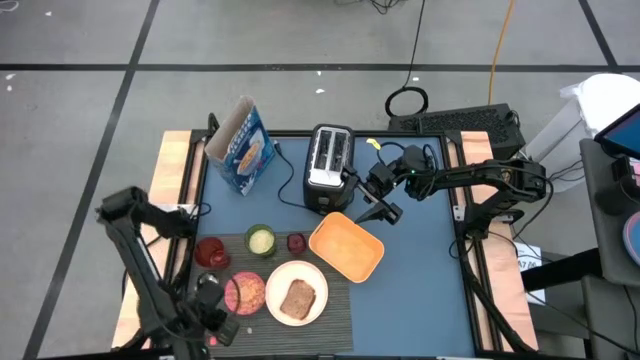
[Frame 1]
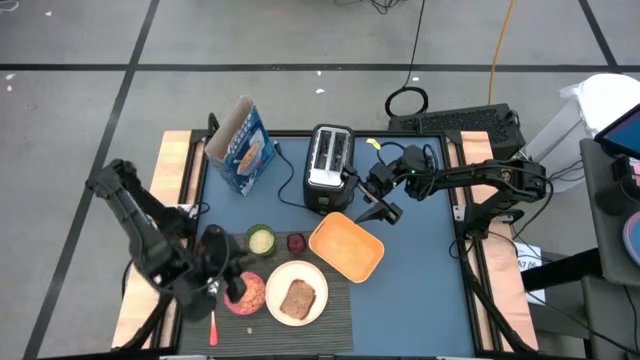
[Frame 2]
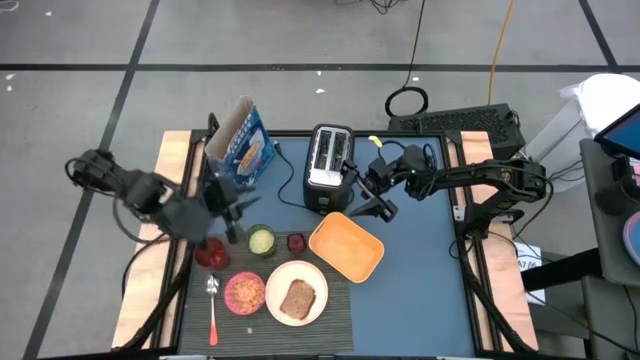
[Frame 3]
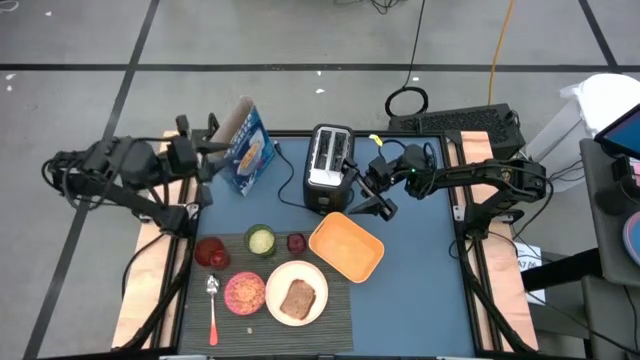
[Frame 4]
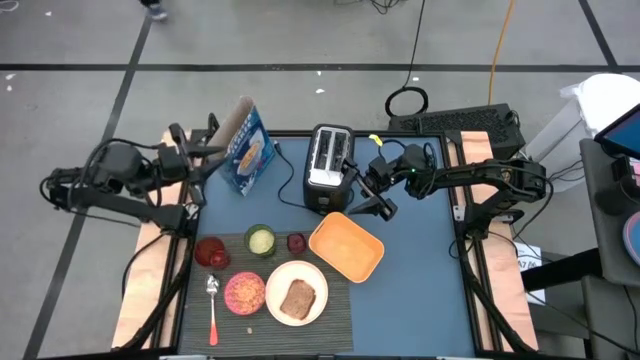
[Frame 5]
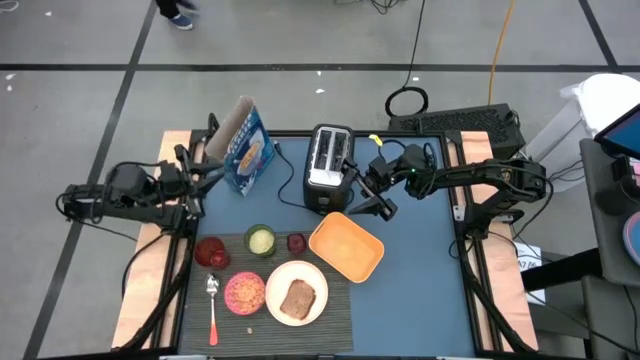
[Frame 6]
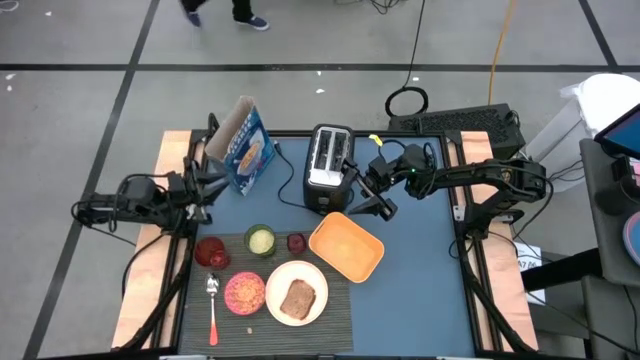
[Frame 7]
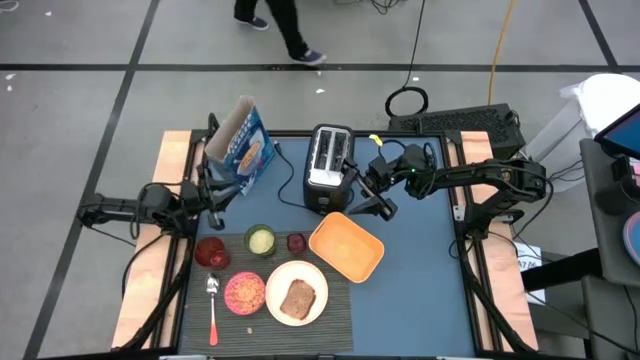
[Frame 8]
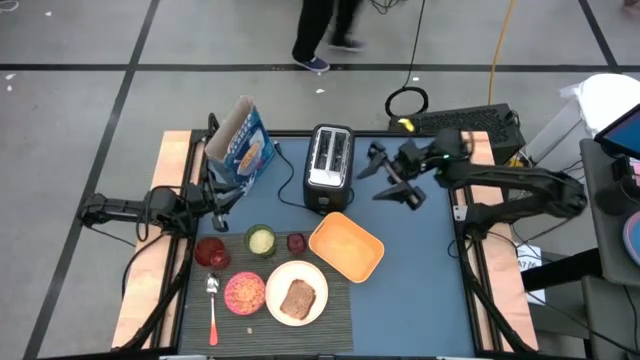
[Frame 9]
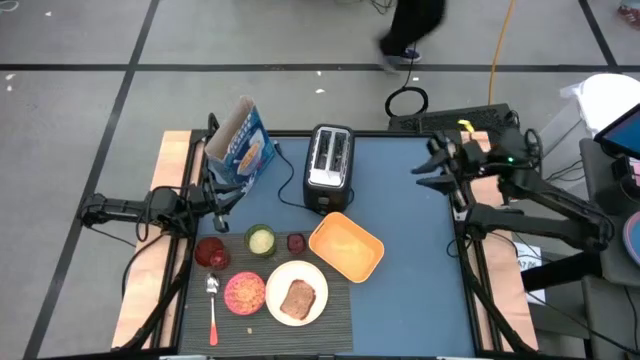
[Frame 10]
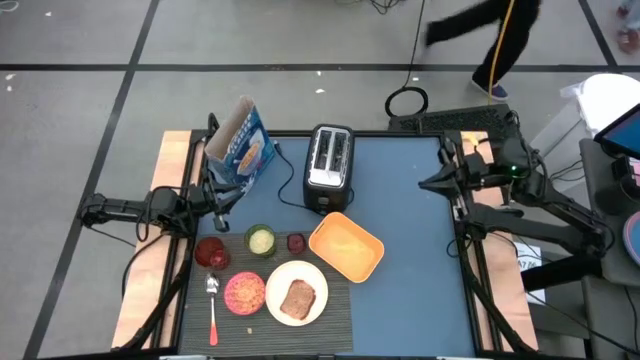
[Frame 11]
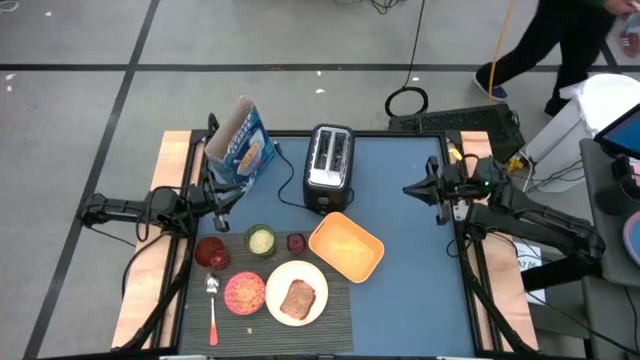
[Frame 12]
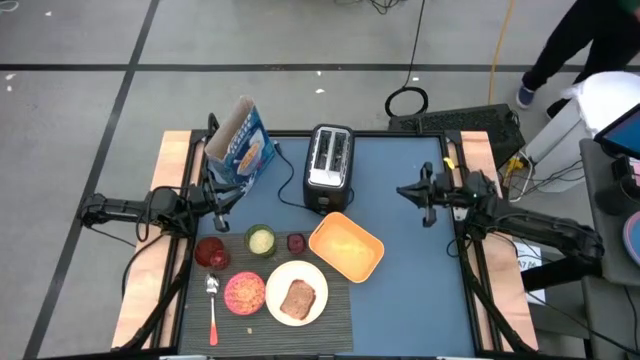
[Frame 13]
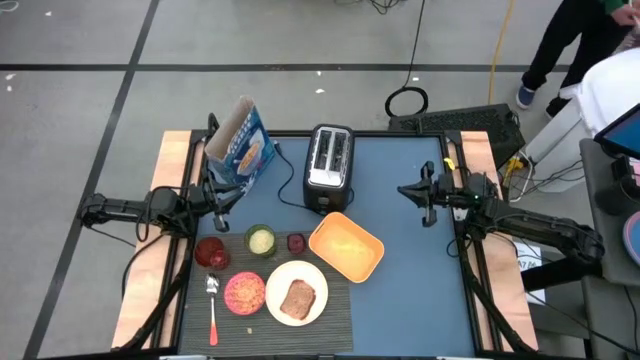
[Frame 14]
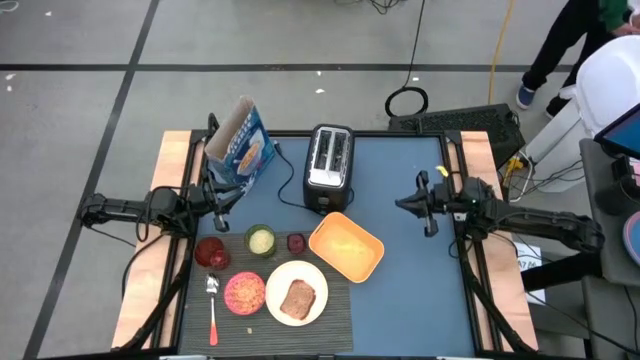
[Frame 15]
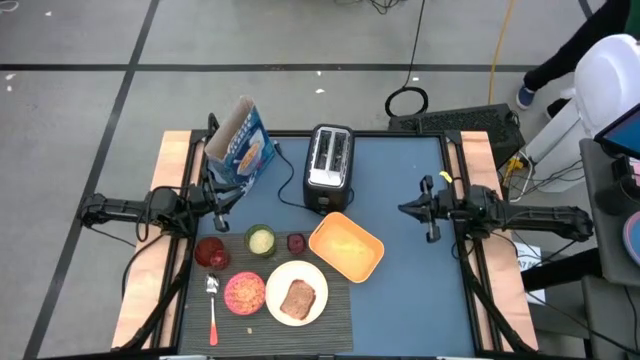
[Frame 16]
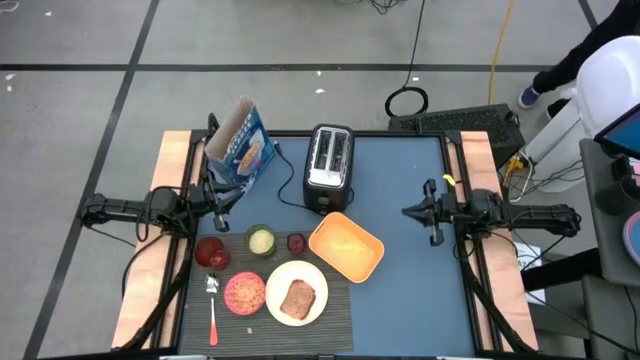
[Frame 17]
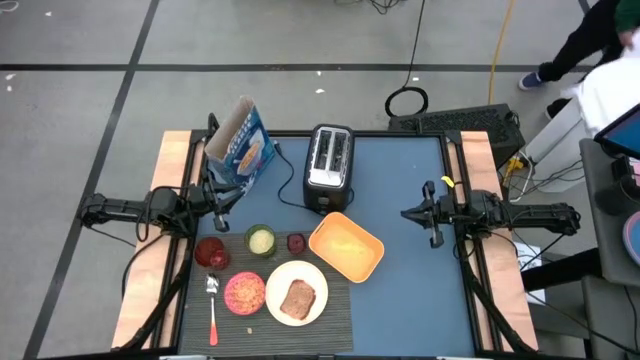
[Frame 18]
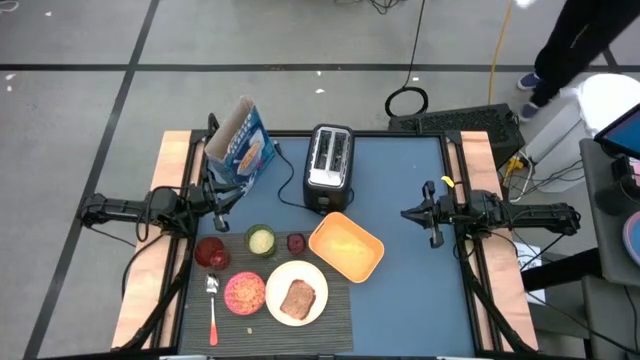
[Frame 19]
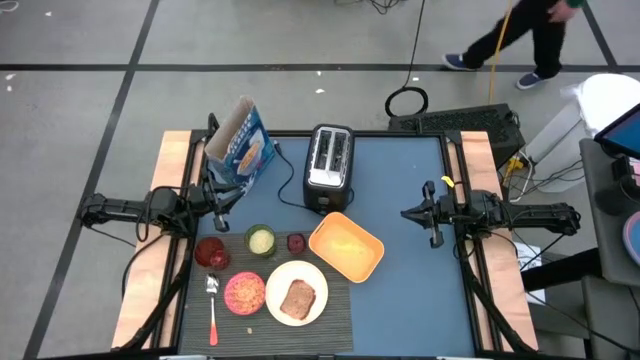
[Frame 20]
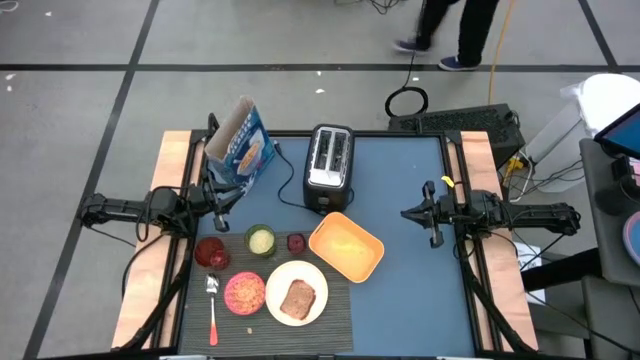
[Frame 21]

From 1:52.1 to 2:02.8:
Task: Arrange a breakfast setting
Return to home position

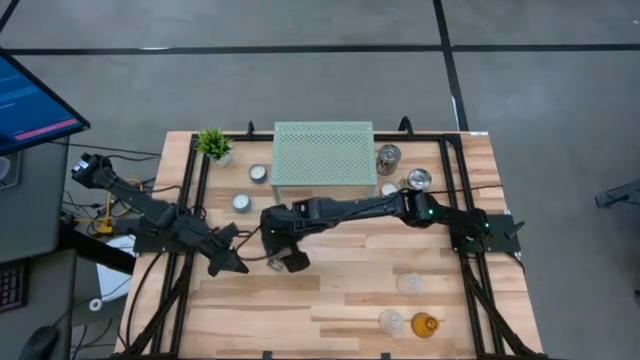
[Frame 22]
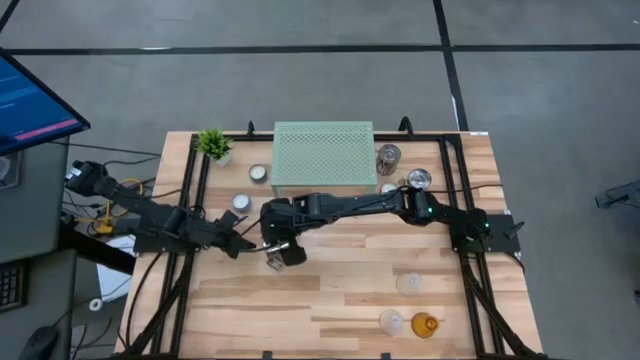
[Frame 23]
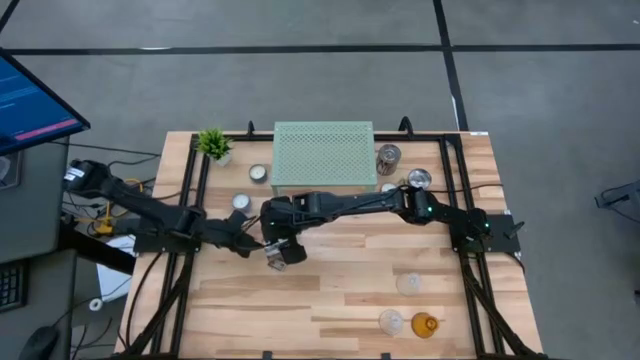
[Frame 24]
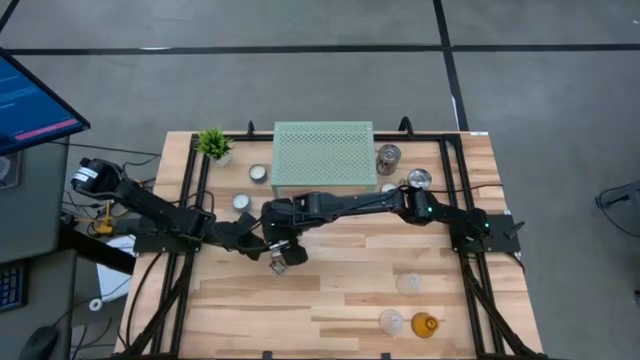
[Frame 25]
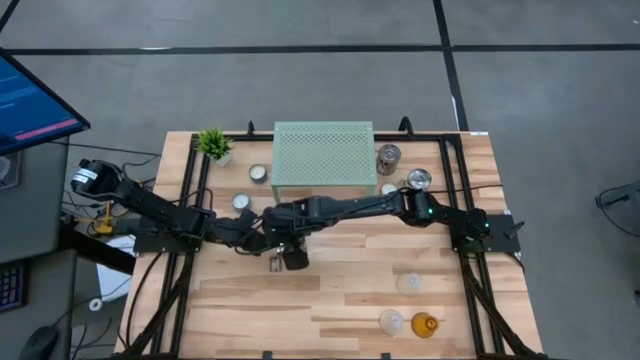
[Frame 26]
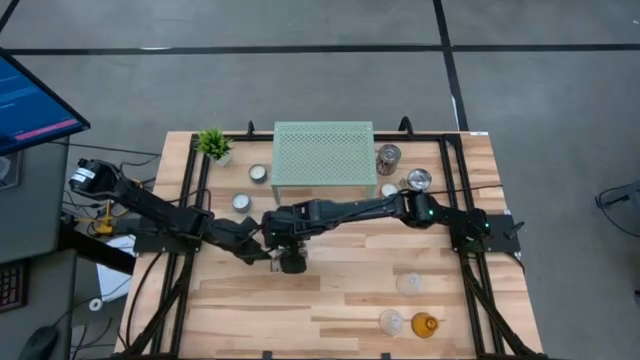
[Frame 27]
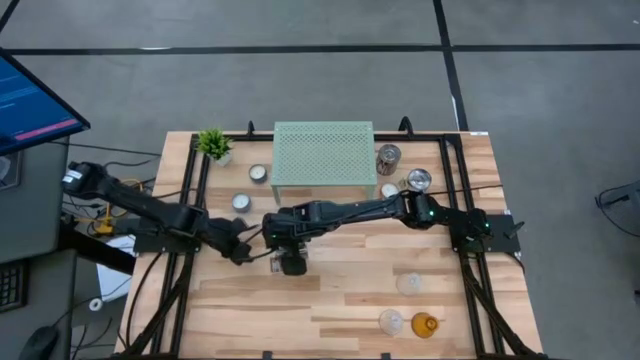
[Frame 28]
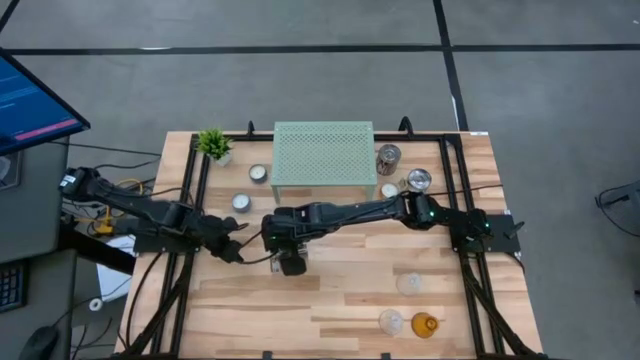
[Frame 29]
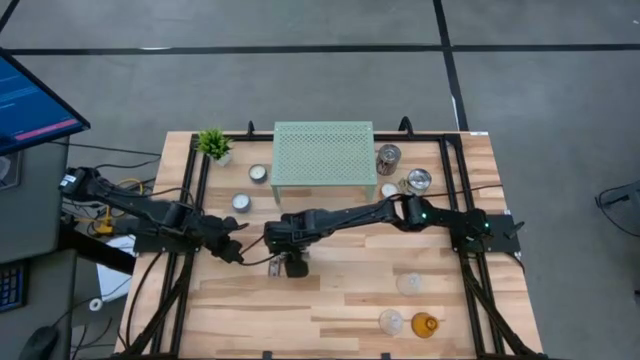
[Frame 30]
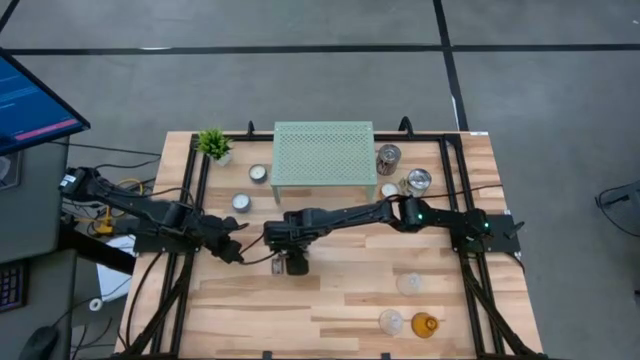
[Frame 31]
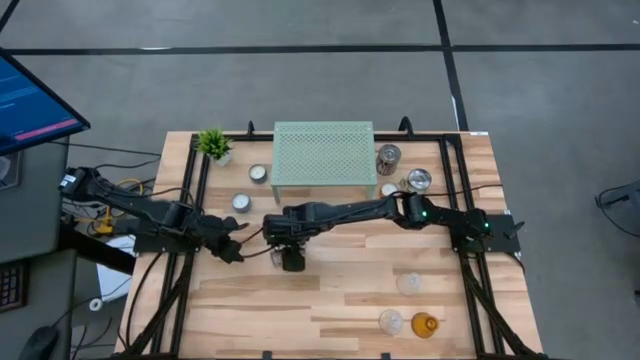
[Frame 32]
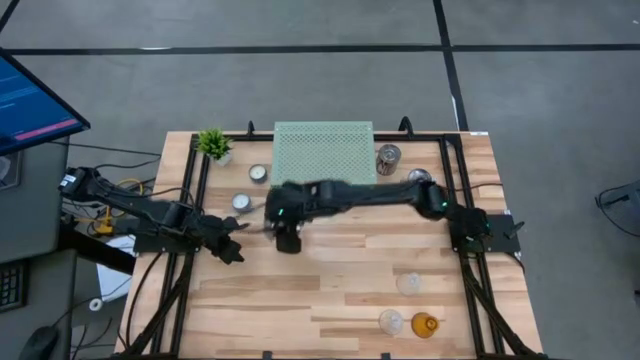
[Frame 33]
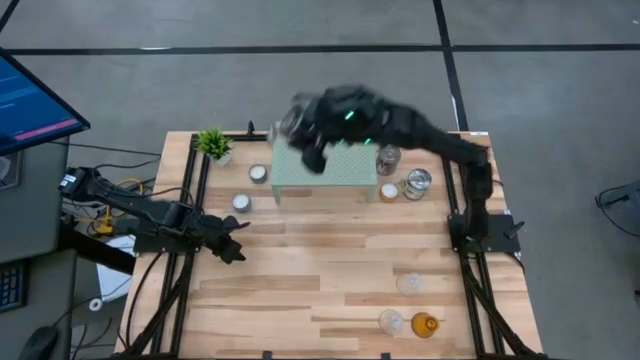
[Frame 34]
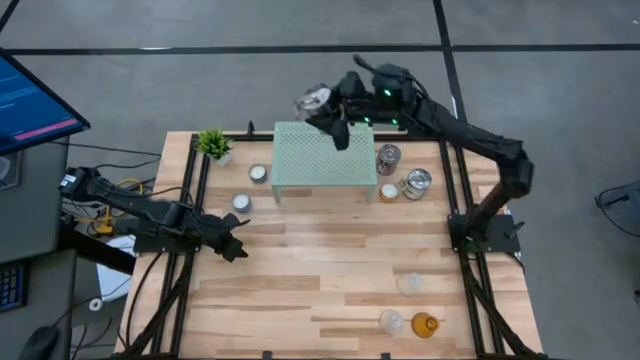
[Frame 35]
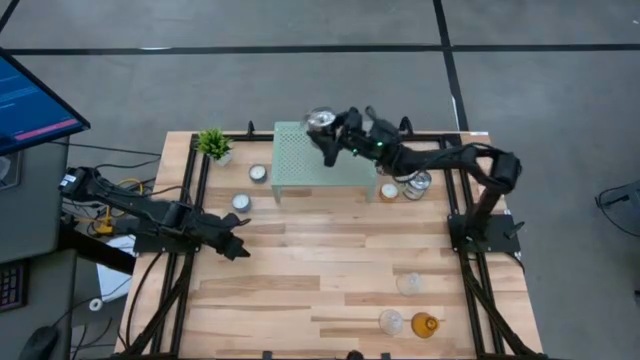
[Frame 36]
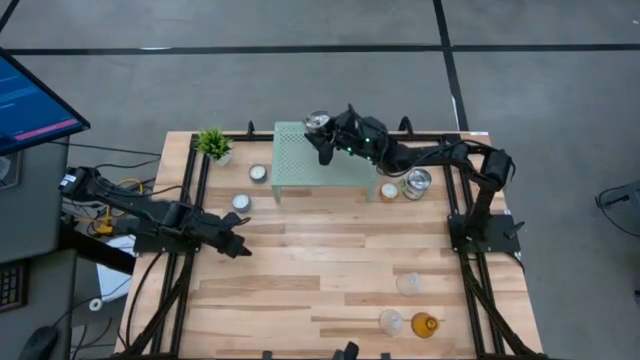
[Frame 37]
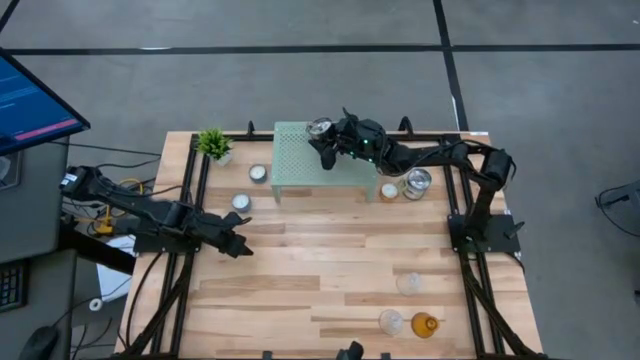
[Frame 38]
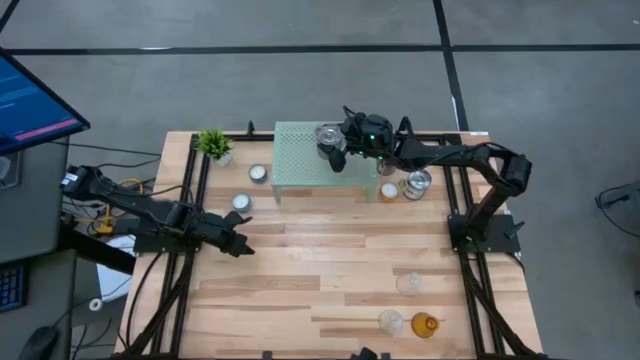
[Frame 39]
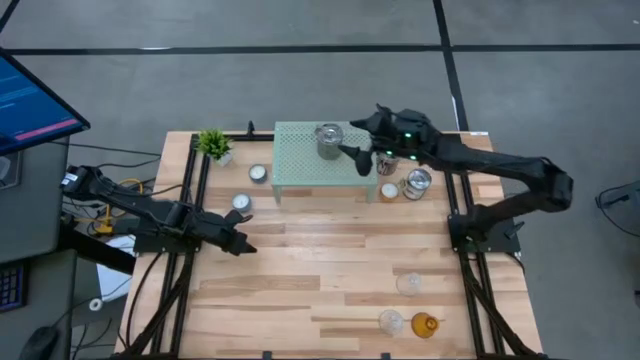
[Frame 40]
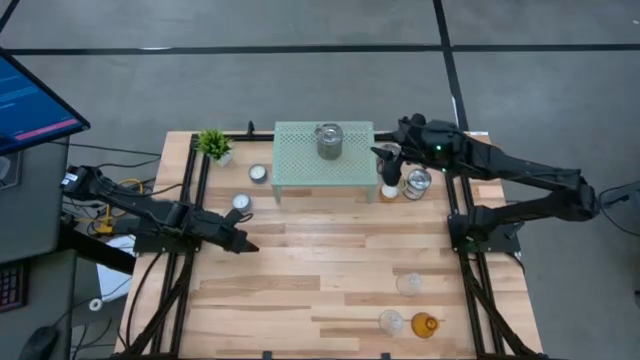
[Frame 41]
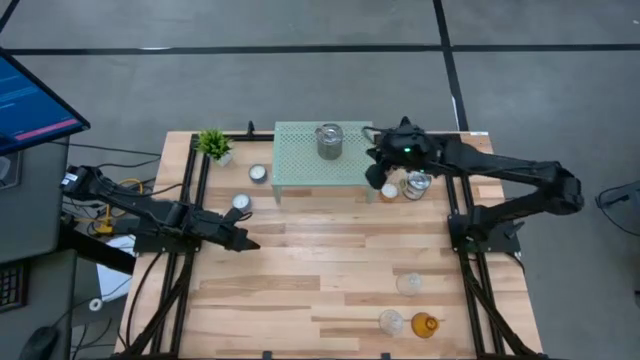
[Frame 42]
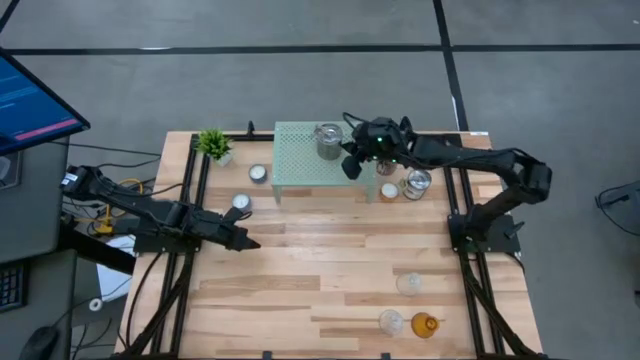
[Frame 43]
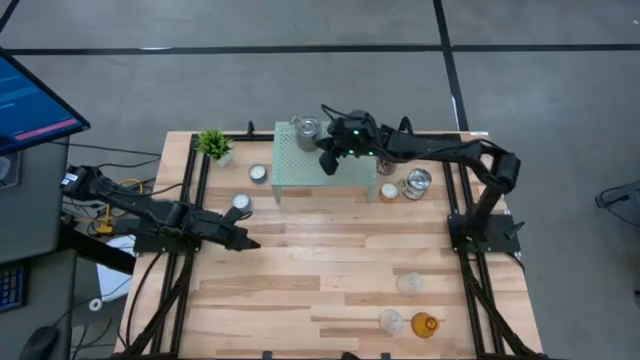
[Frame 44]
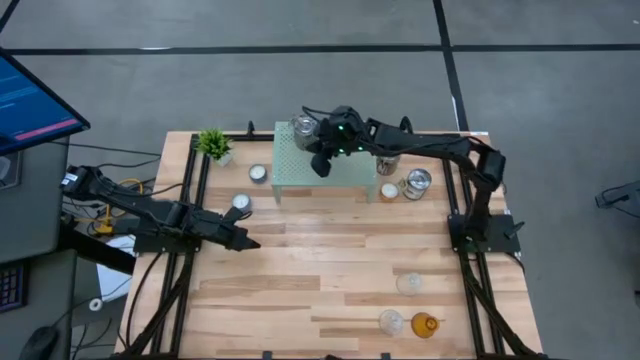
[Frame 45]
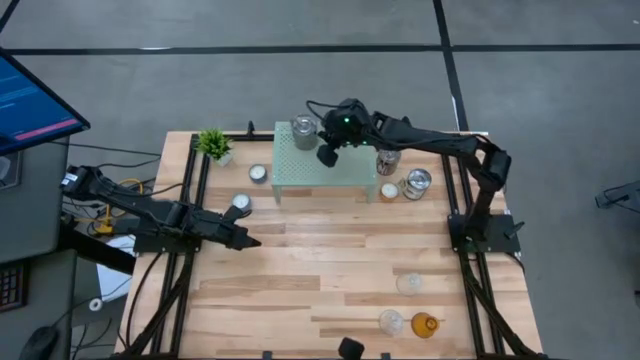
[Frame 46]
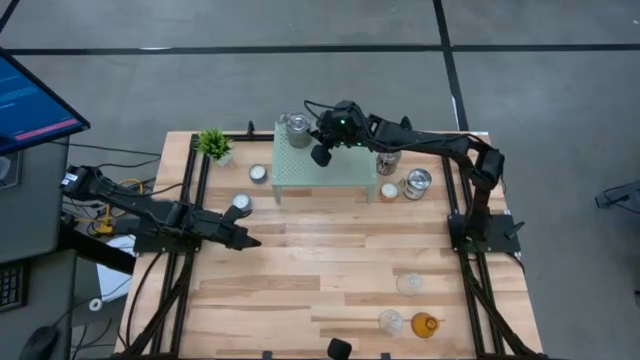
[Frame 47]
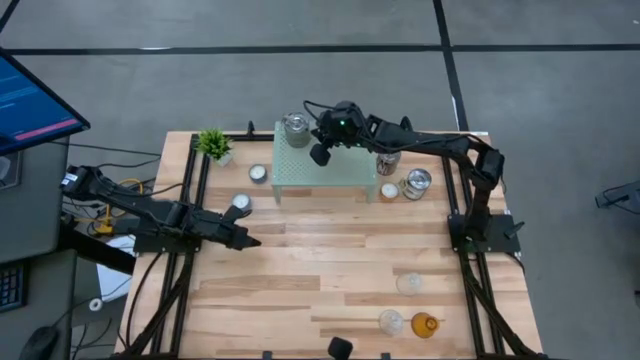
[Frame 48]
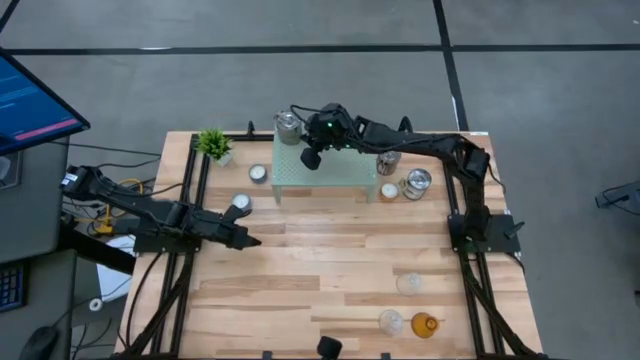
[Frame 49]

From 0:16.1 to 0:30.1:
Task: Pick & Place candle stick holders
Put the bottom silver scented candle on the shelf
